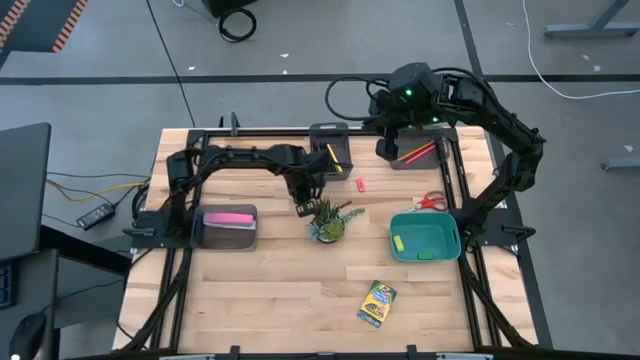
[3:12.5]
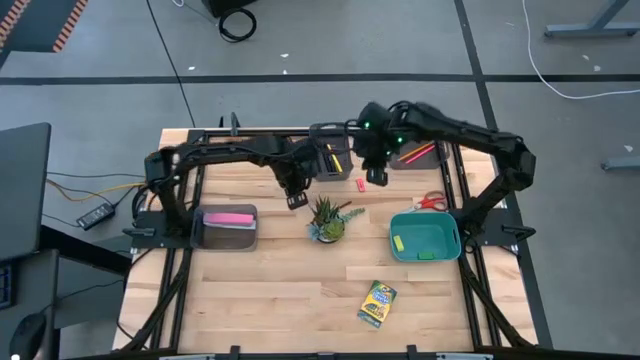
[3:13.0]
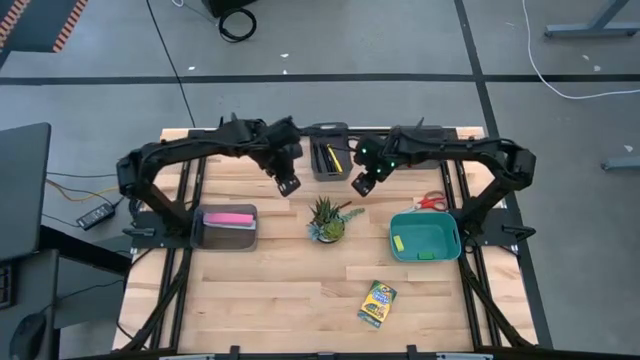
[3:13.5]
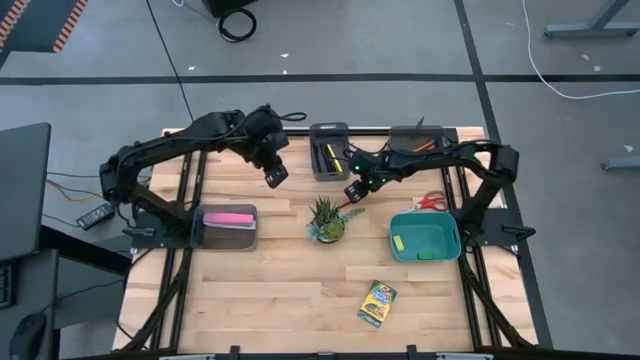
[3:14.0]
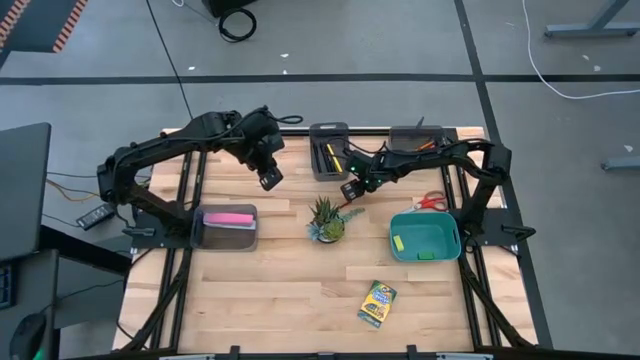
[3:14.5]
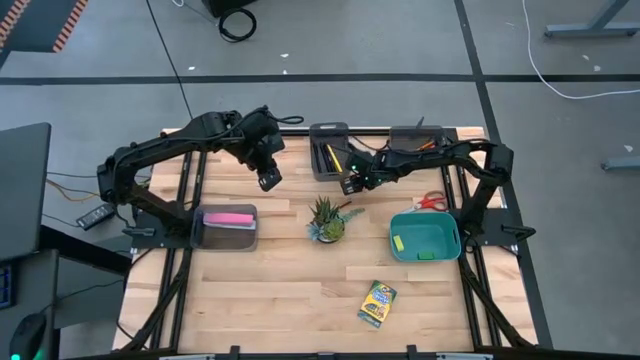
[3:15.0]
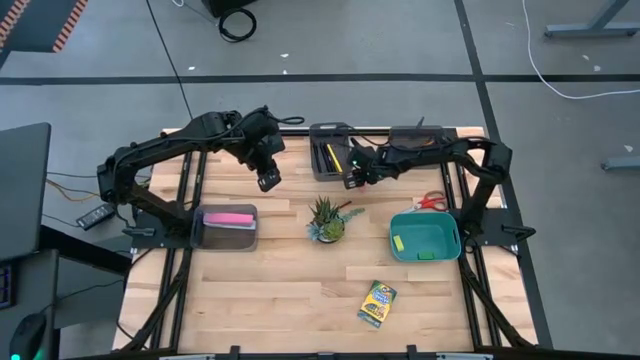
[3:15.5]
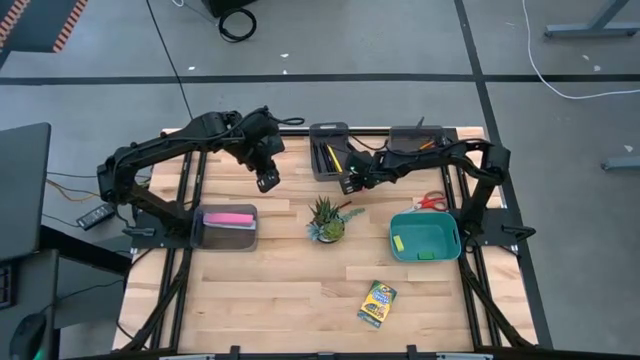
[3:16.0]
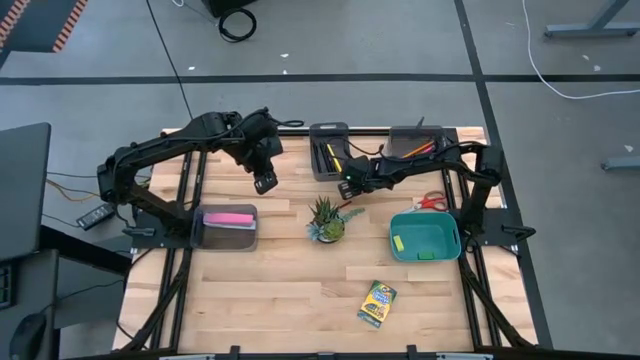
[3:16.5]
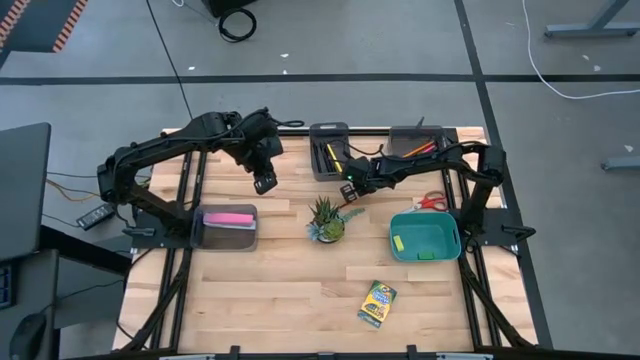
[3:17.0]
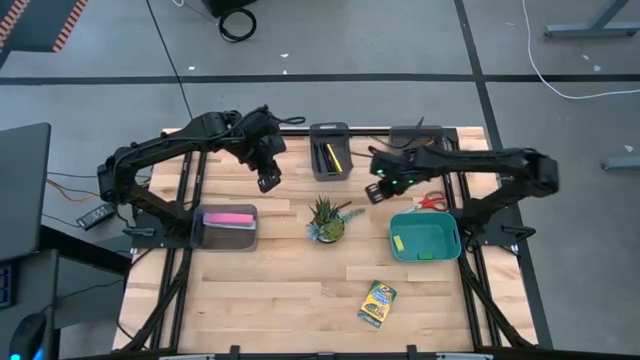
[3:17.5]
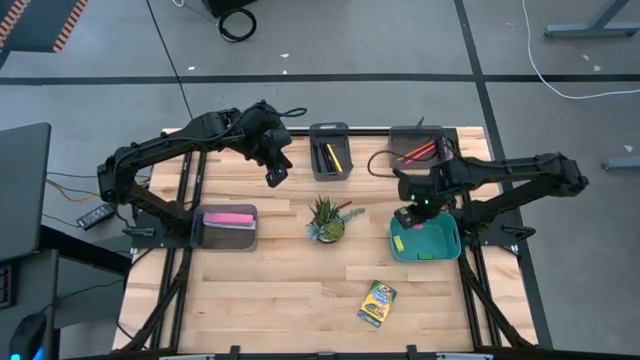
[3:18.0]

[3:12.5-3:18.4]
Task: Sort crayons/erasers/pens/pencils in bins
Put the pink eraser into the green blue bin

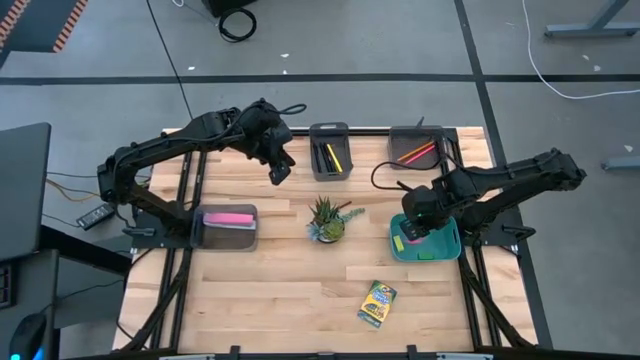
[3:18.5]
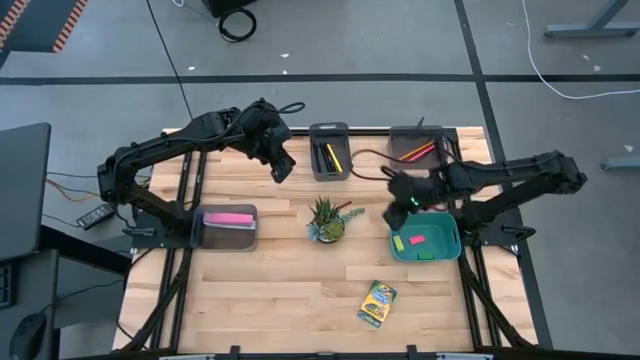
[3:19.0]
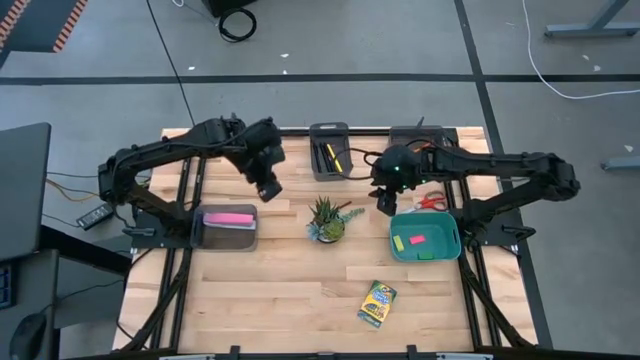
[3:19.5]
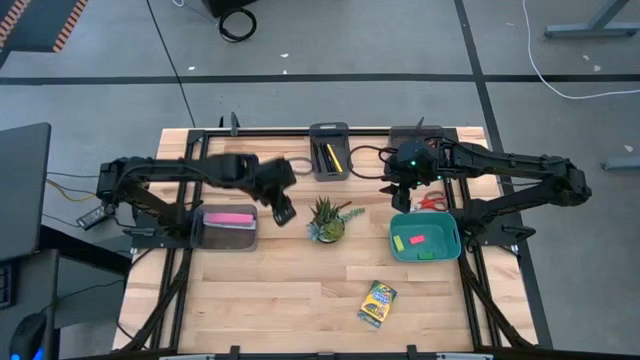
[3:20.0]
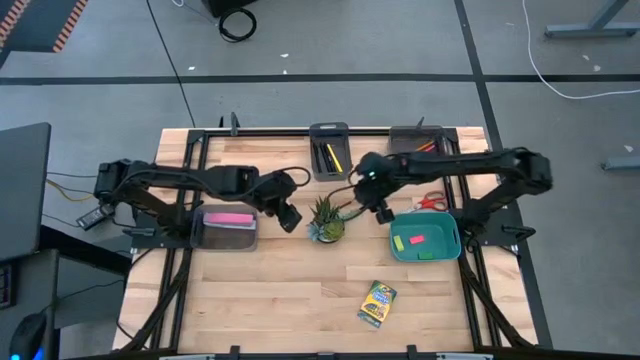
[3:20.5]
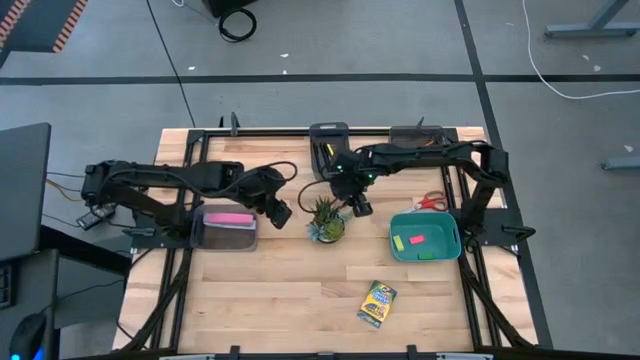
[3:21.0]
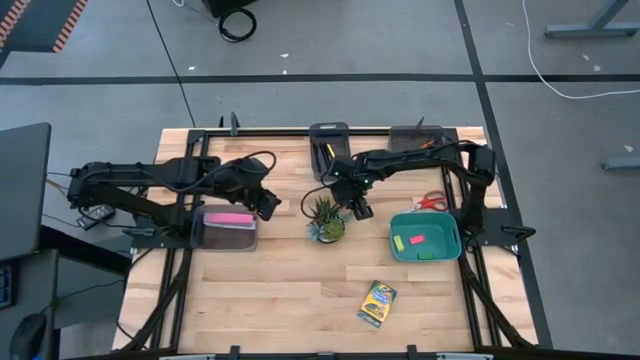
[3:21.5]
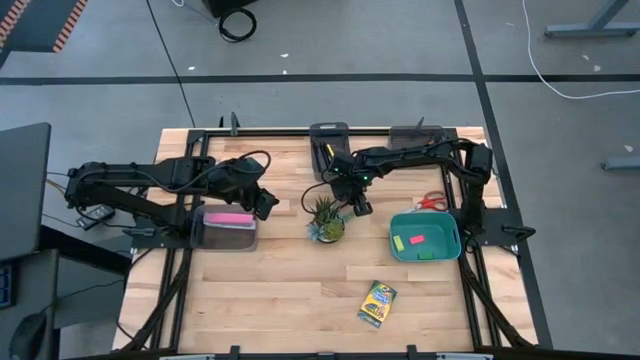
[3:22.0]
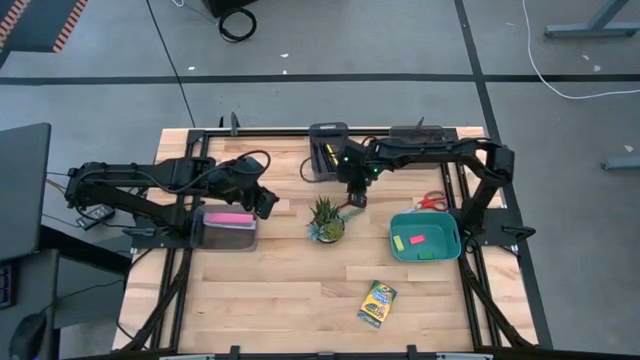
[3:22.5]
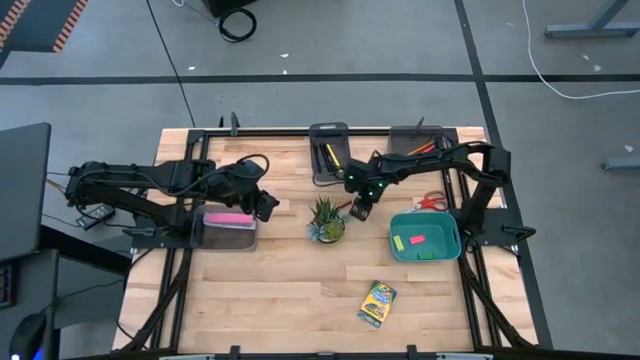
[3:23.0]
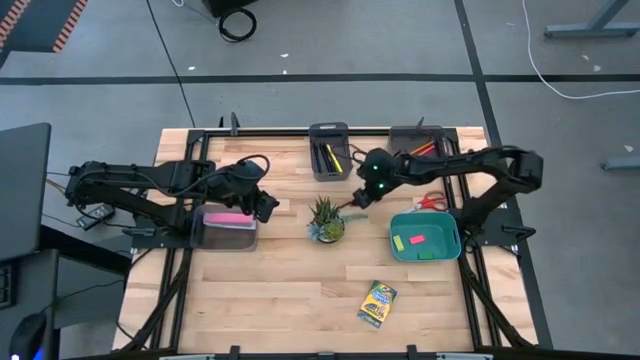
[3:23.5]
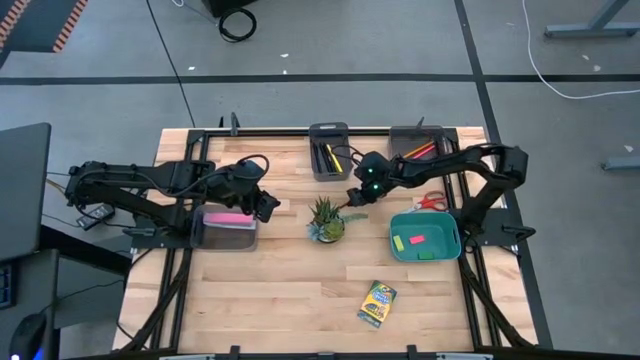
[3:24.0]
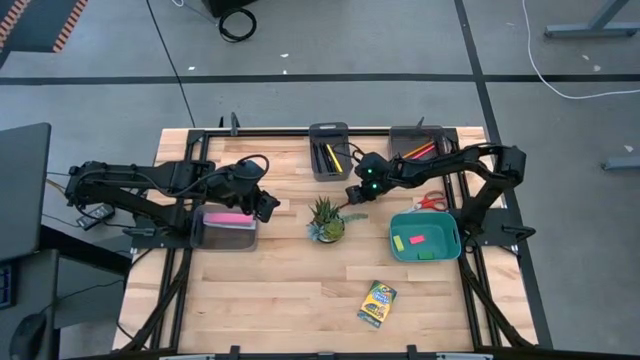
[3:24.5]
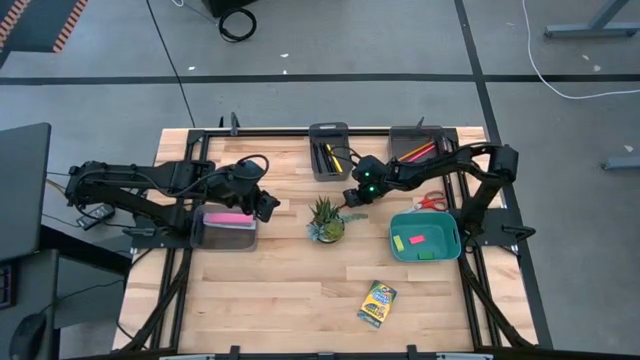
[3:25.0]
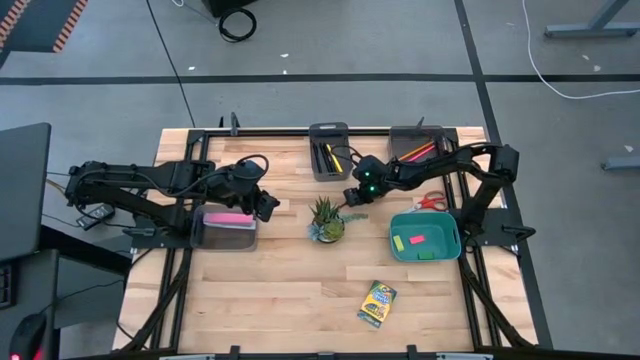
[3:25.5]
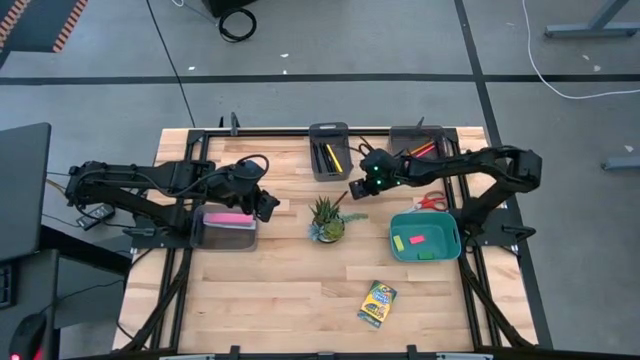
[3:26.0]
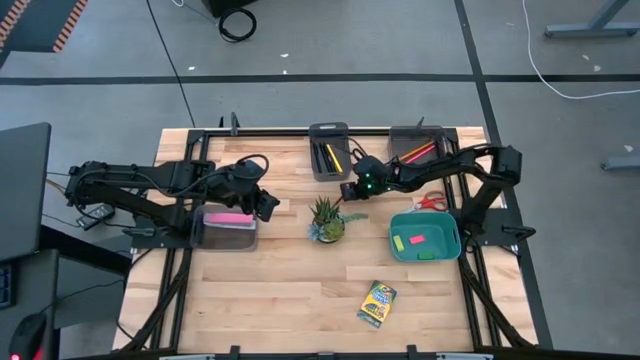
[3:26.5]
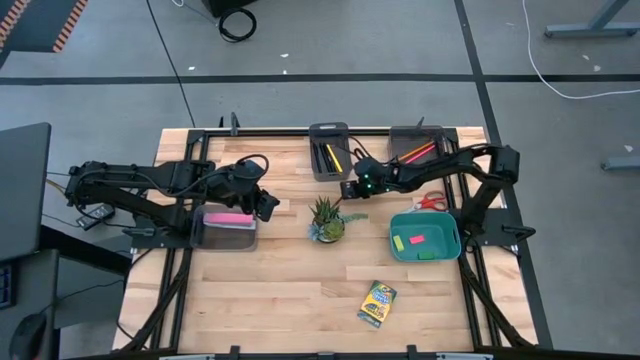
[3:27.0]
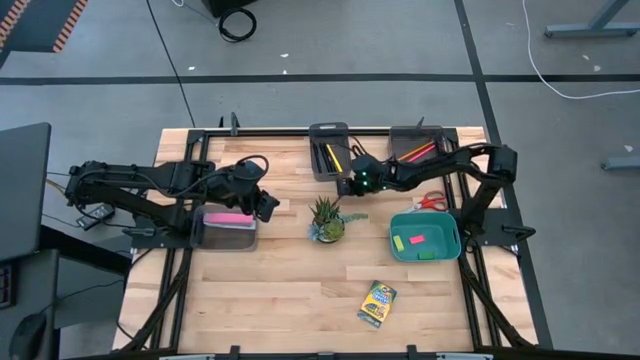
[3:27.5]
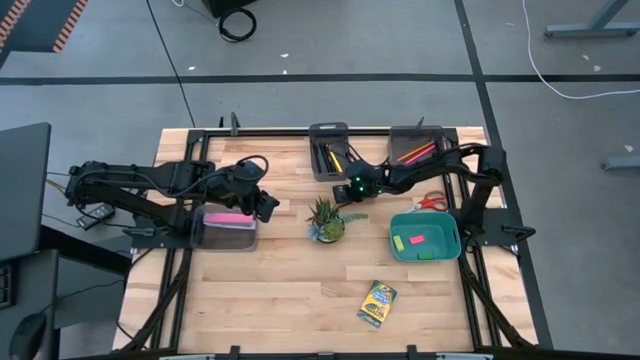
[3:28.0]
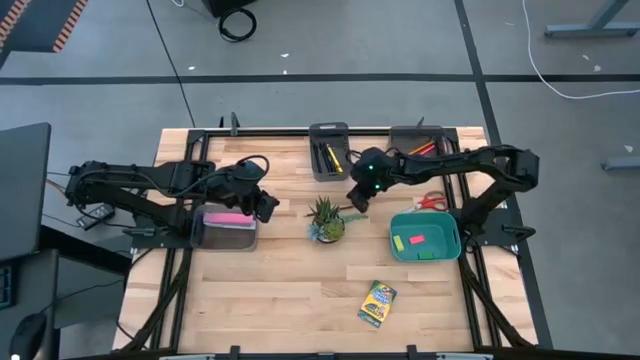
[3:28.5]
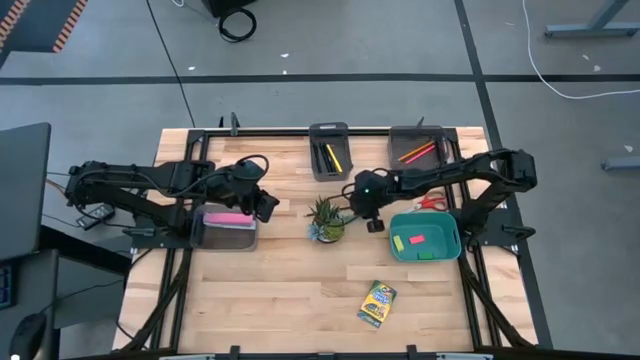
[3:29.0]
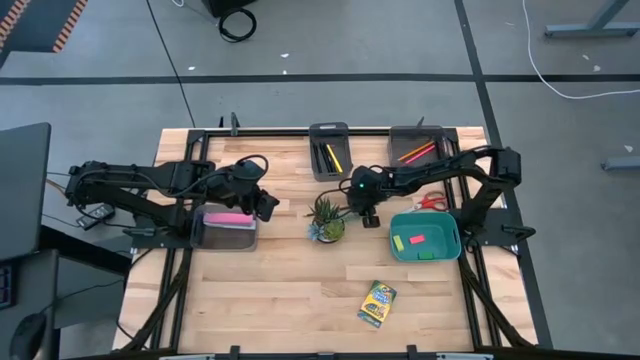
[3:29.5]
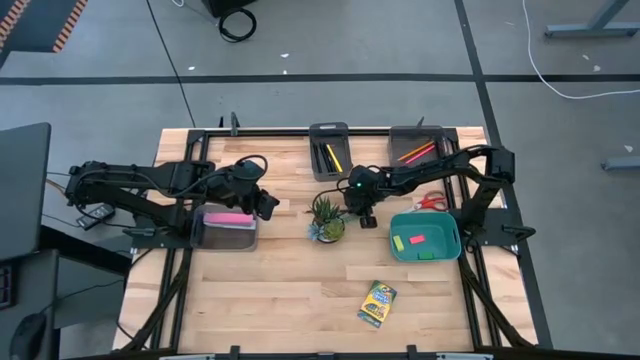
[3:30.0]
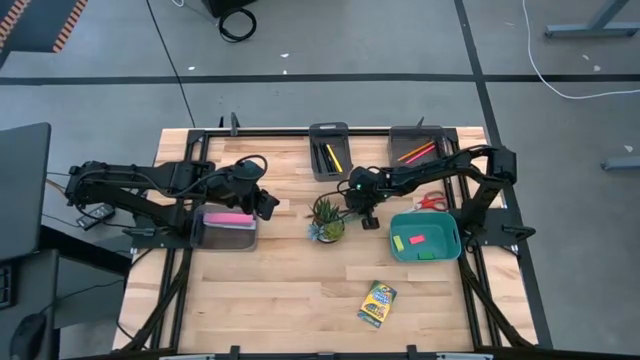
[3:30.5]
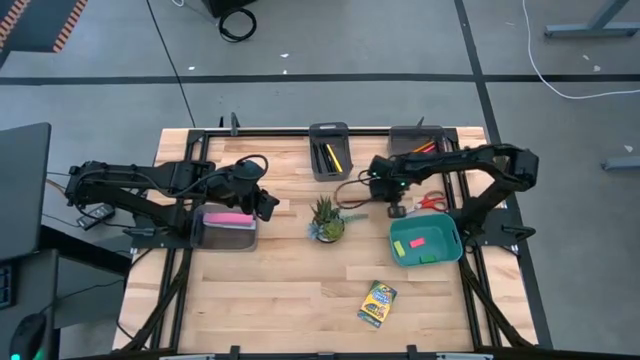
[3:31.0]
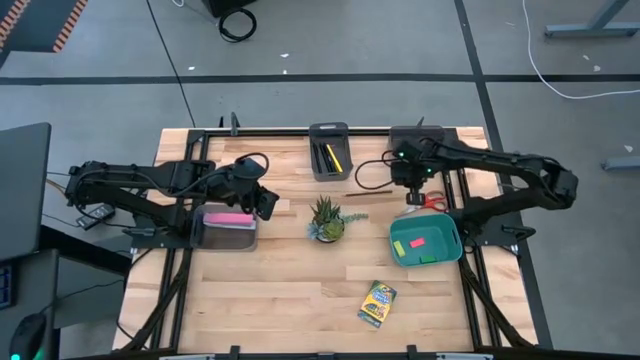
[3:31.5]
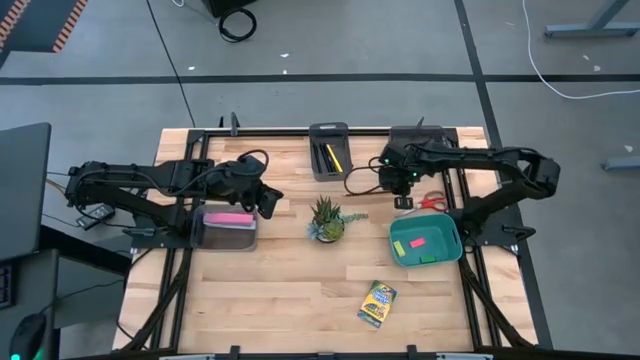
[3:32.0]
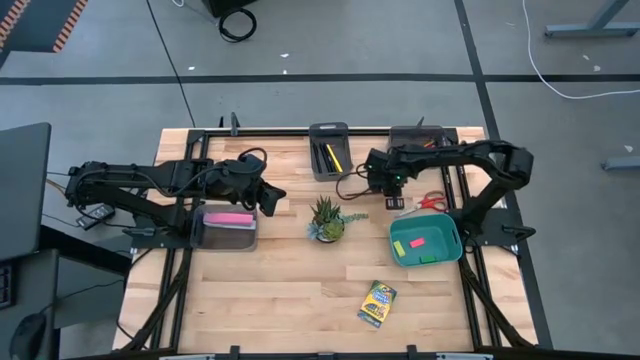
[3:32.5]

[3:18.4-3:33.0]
Put the brown pencil into the right black bin

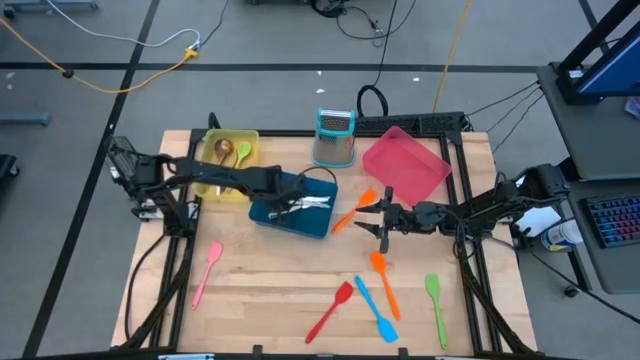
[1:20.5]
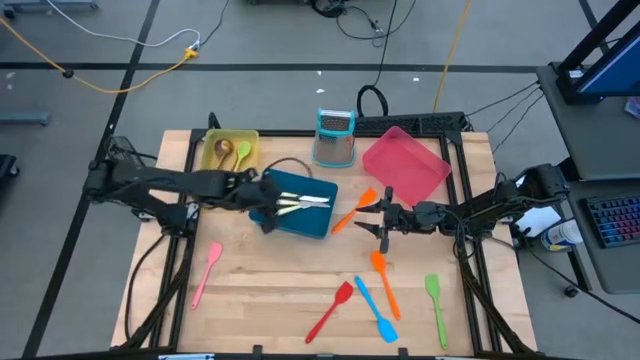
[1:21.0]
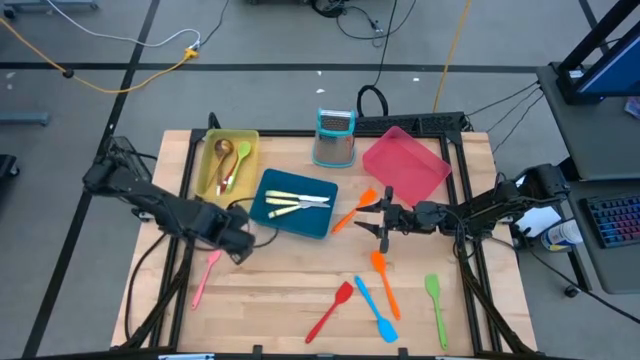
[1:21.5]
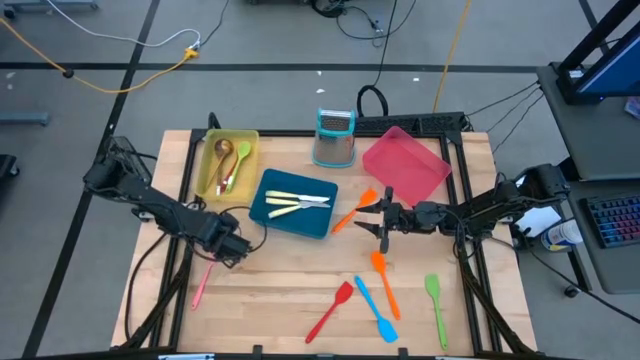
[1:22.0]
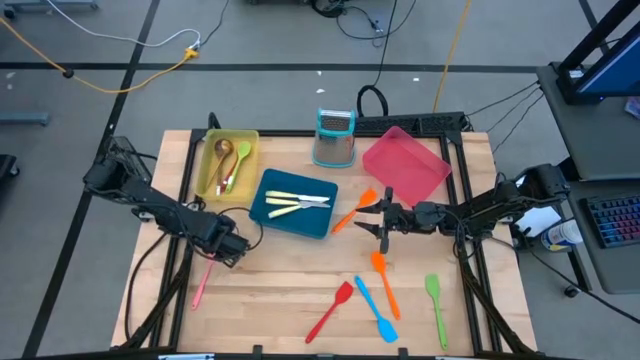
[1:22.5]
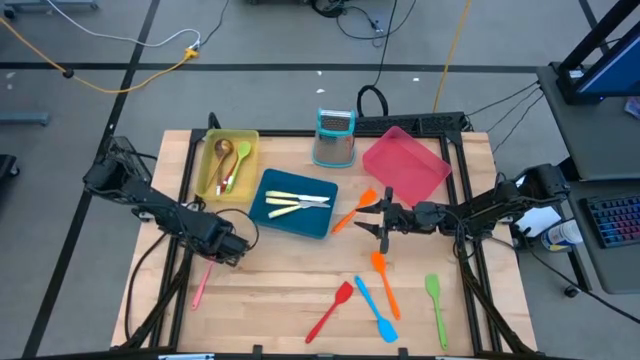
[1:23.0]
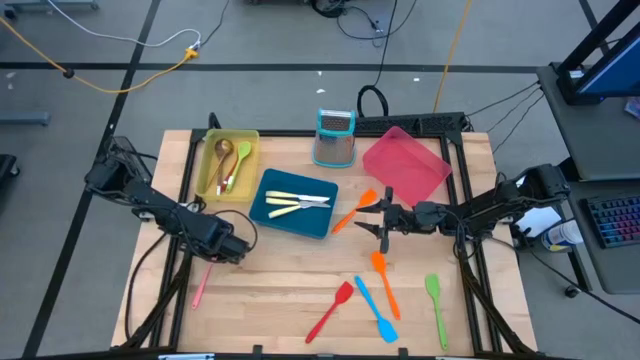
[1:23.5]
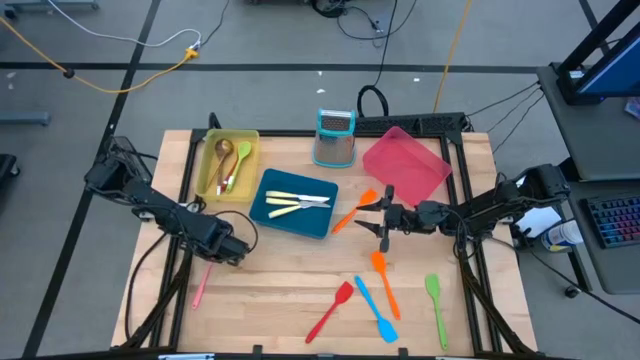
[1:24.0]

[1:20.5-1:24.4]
Task: Pick & Place Kitchen Items
Put the pink spatula into the red bin
